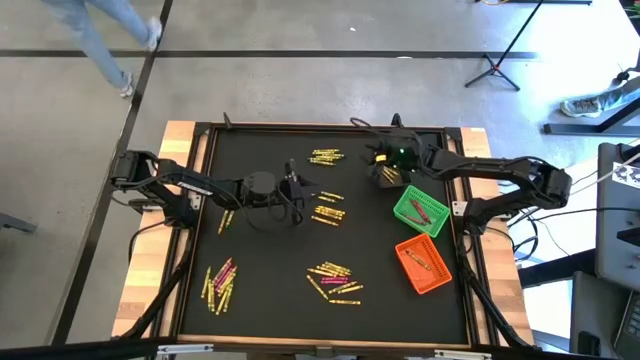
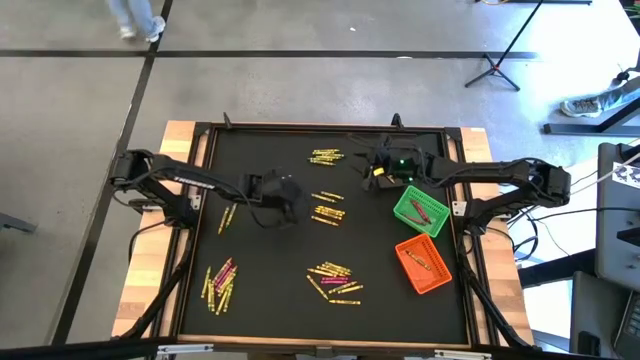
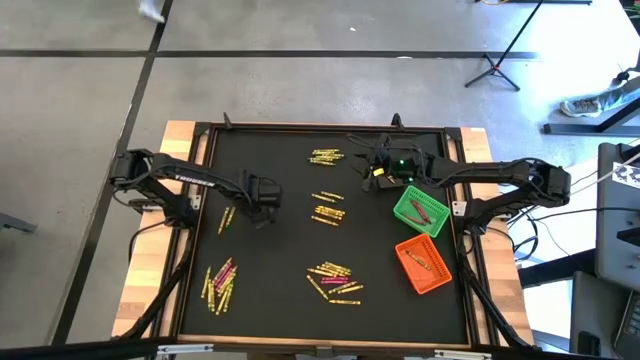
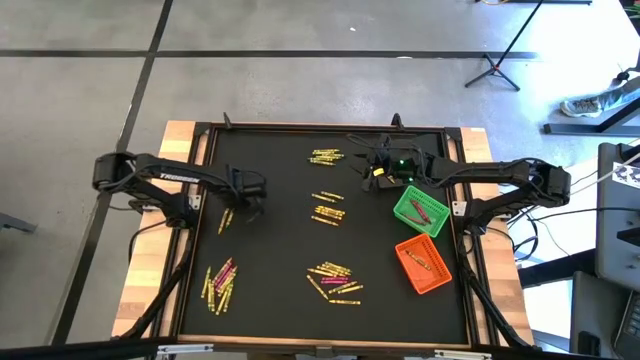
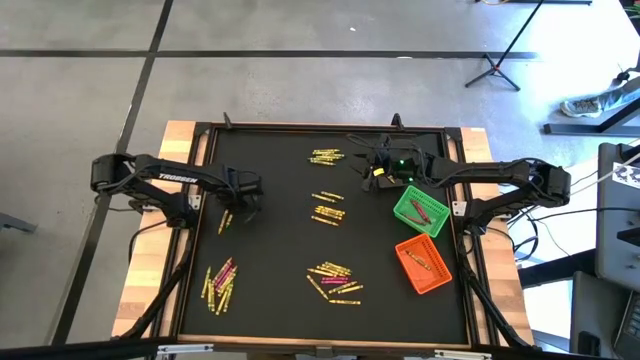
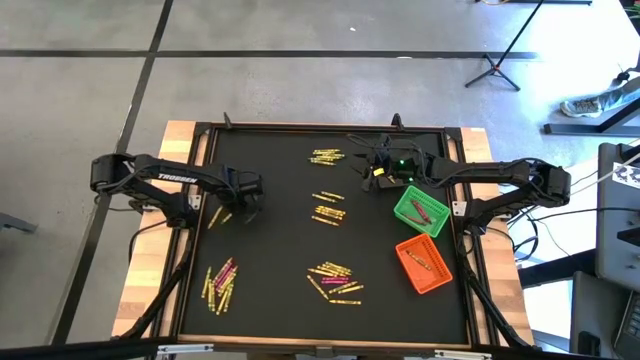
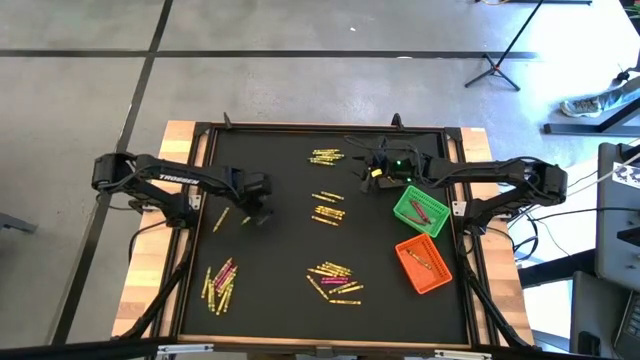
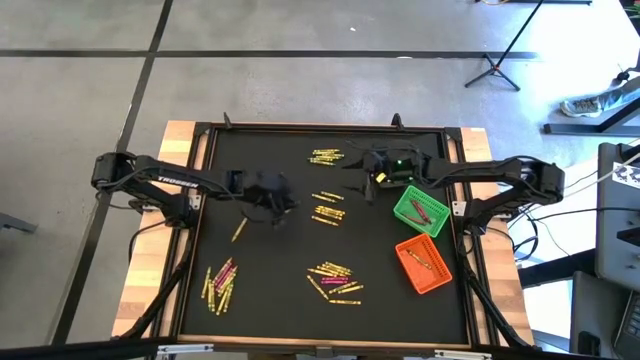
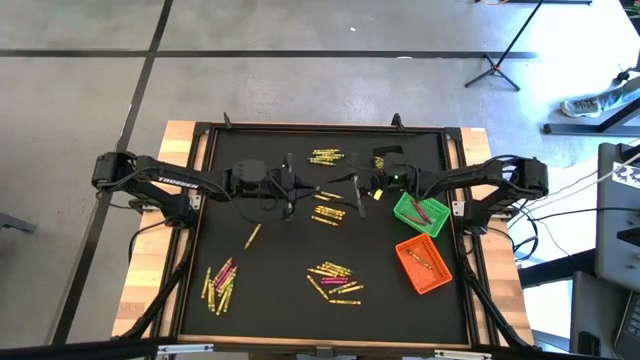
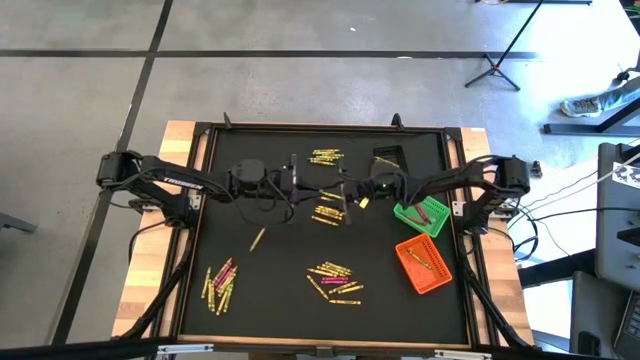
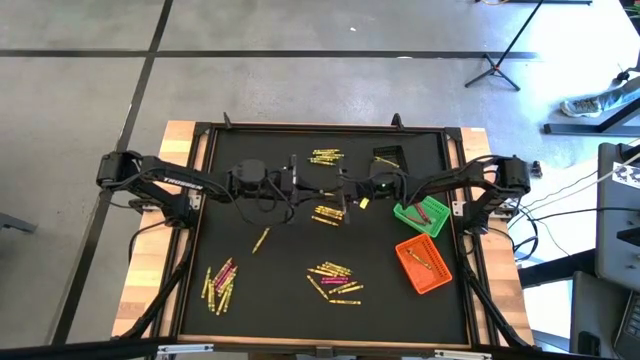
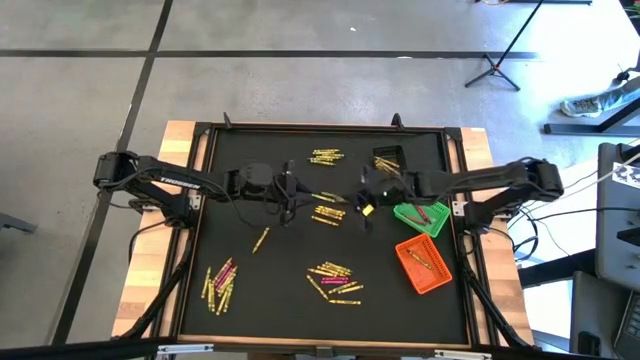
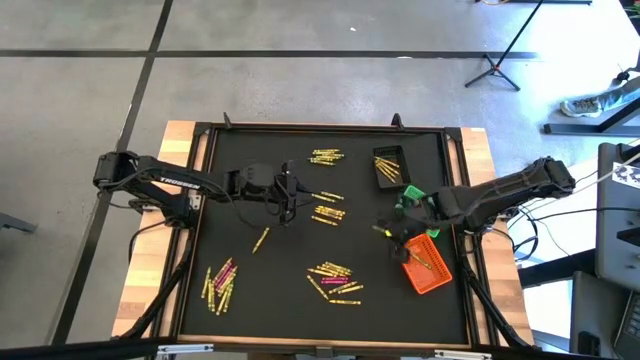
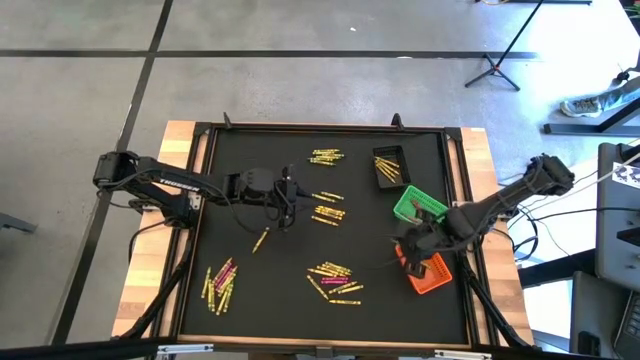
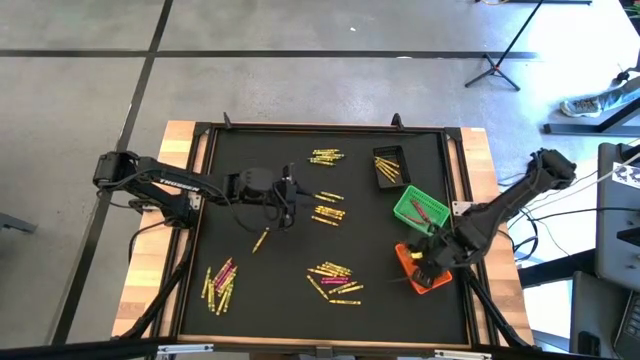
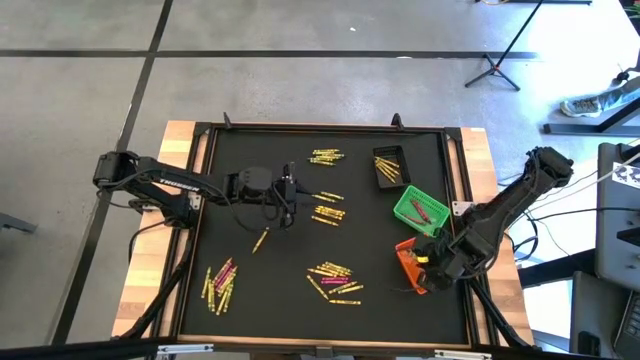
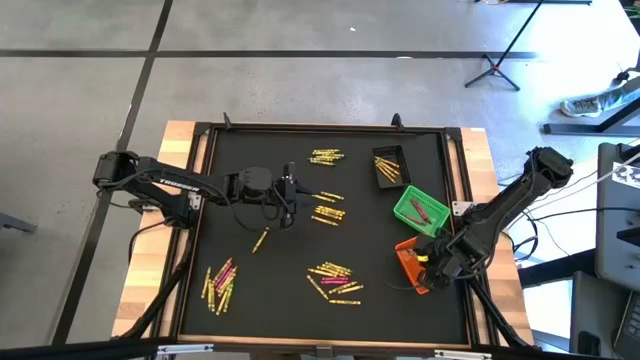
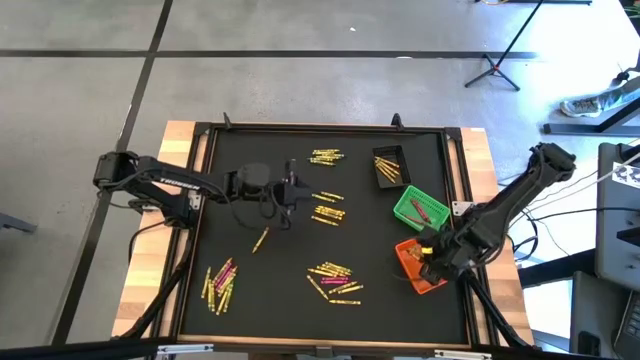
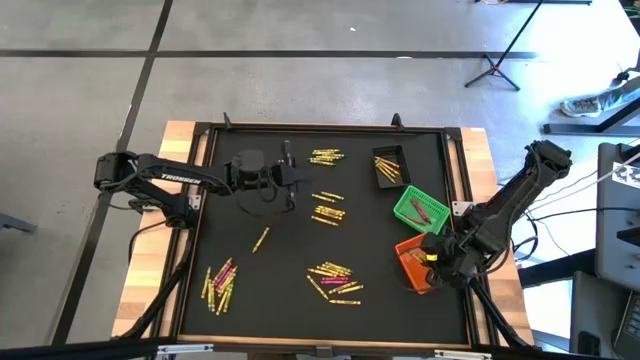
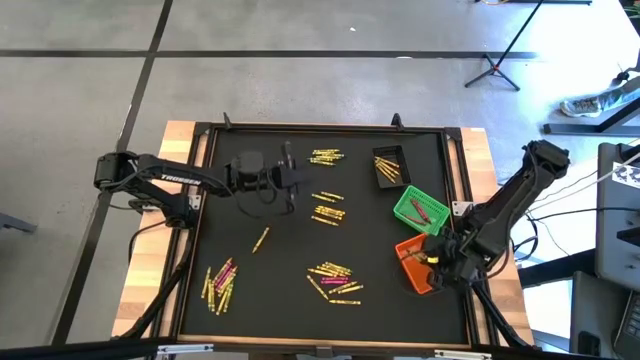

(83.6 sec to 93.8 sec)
Task: Sort crayons
Put the green crayon into the orange basket

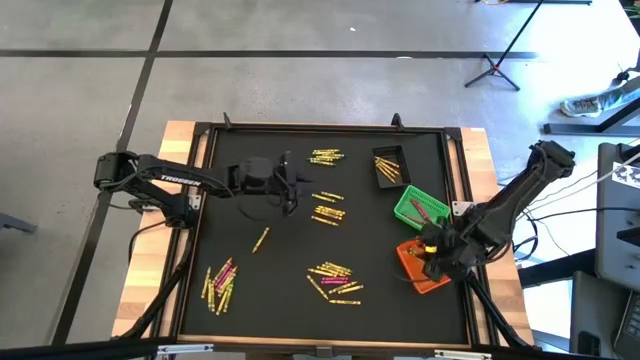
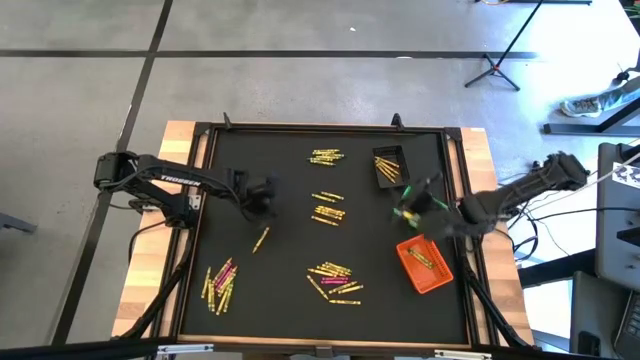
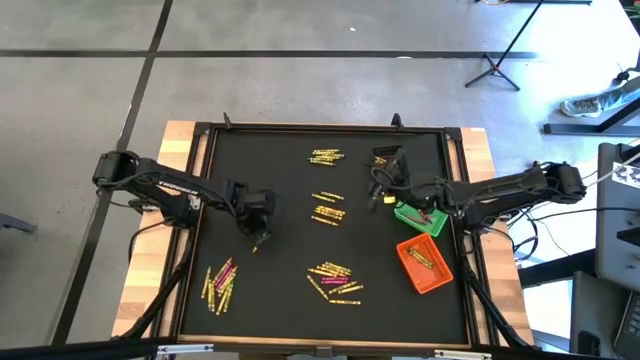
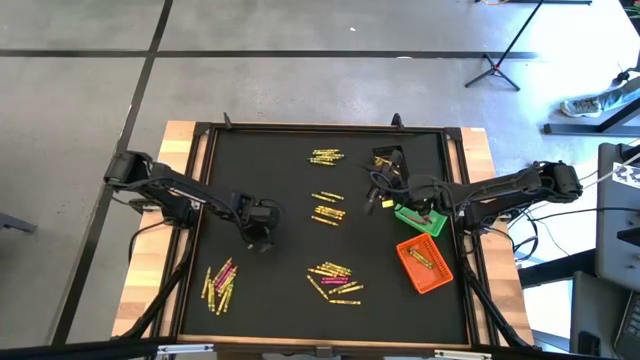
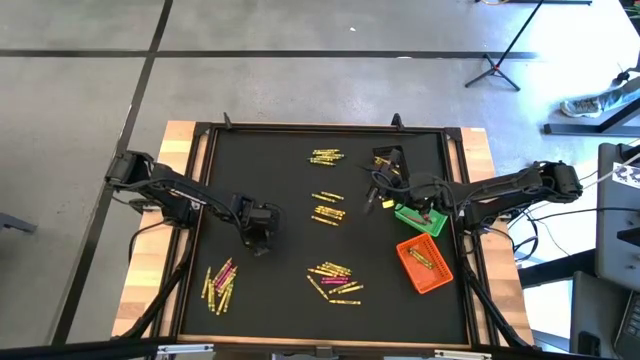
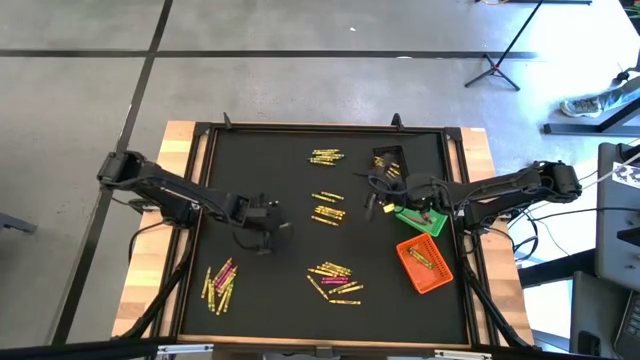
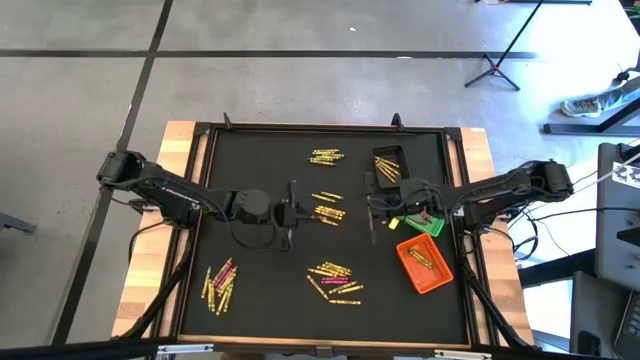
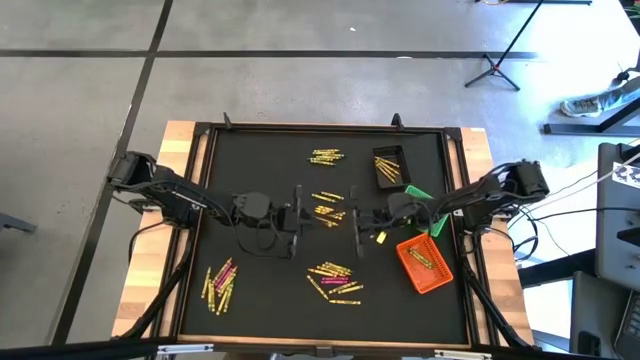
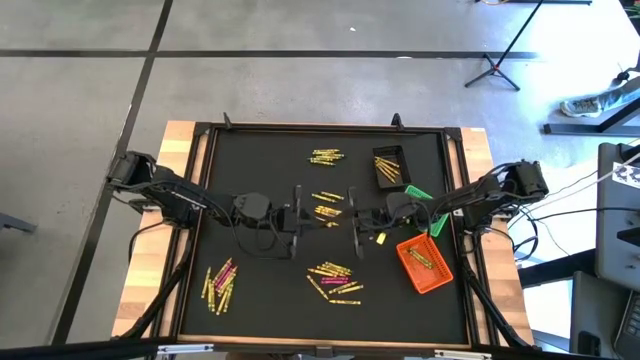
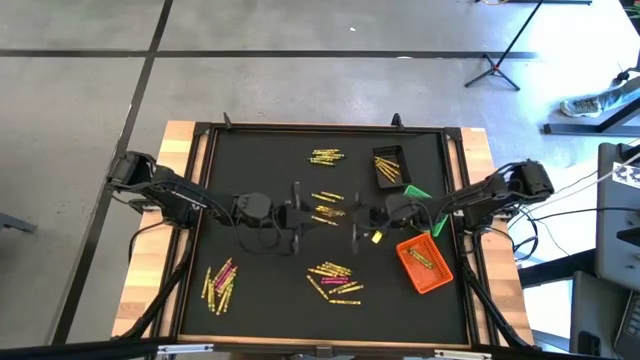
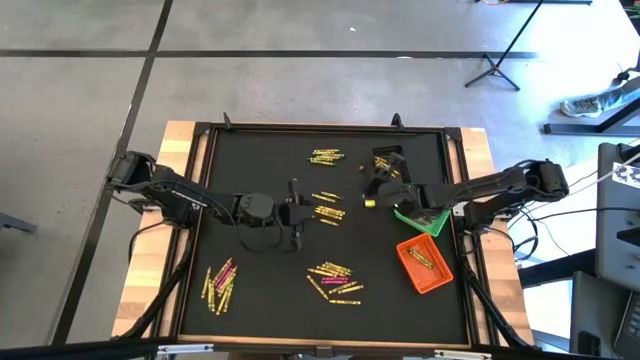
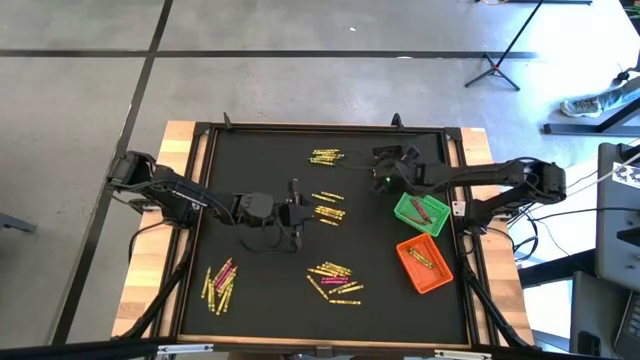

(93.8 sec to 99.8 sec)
Put the yellow crayon into the black basket

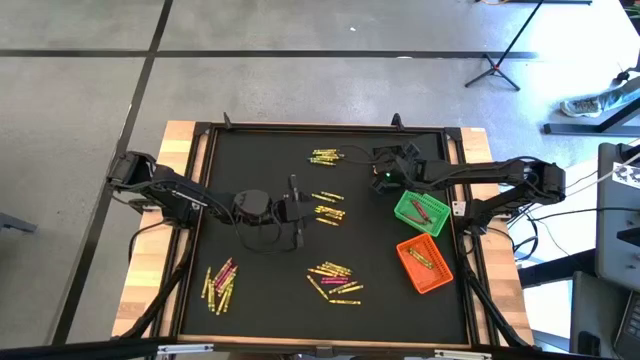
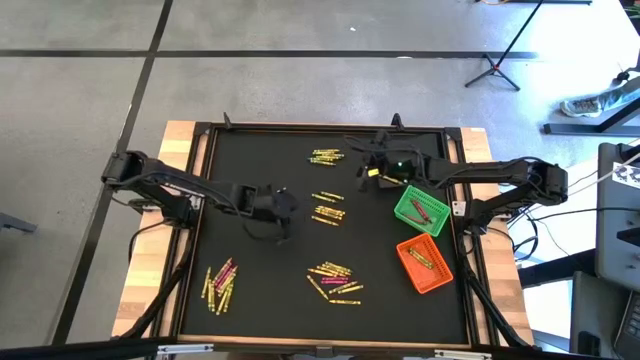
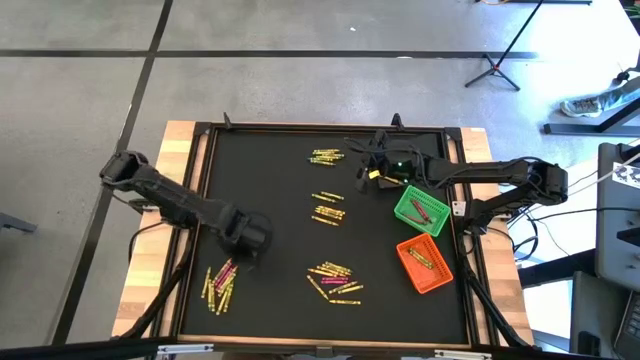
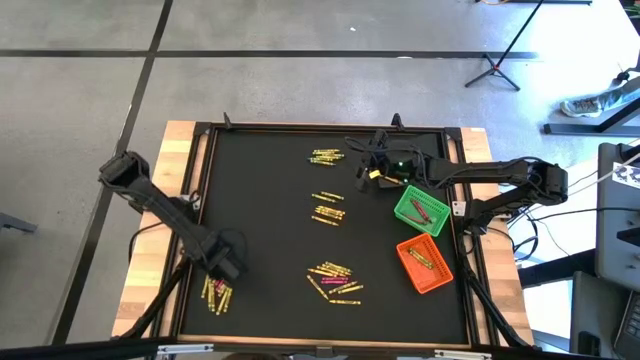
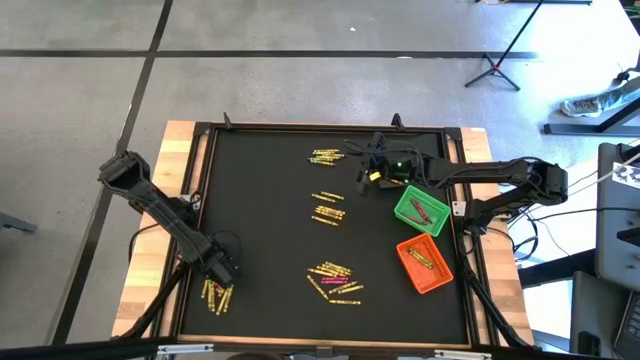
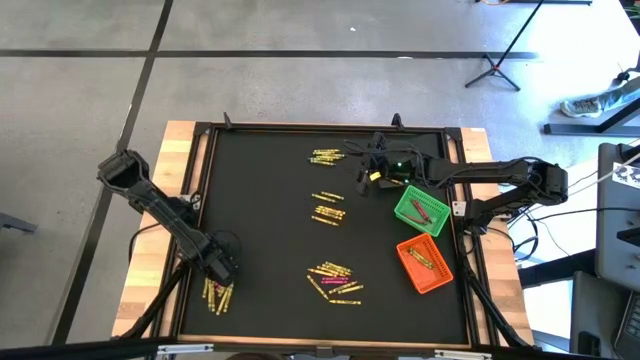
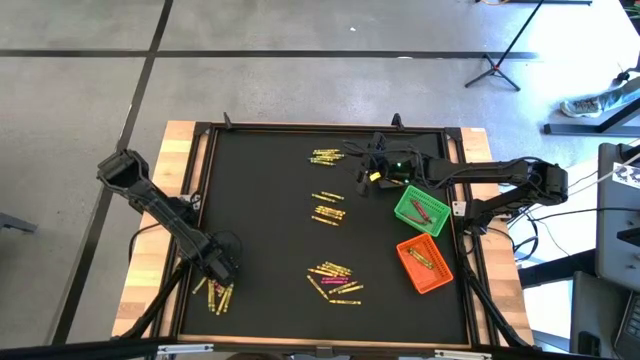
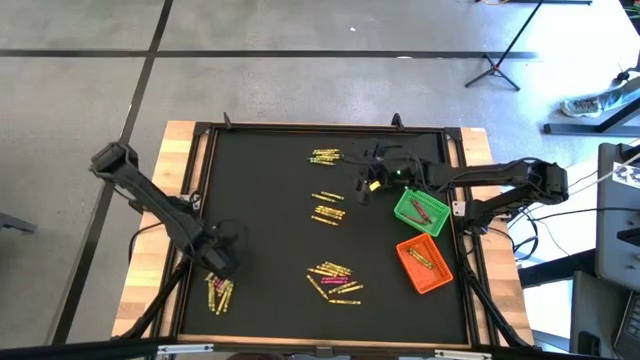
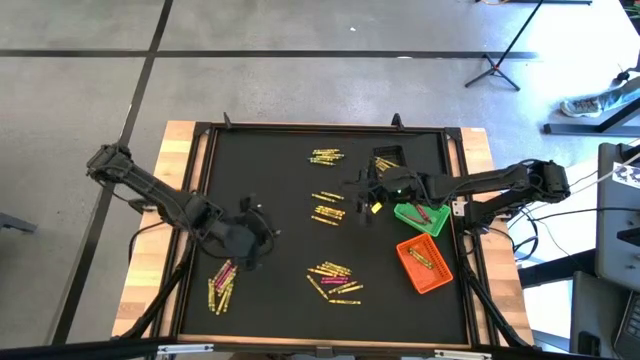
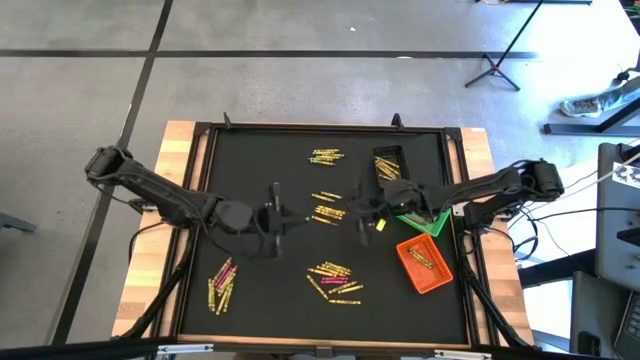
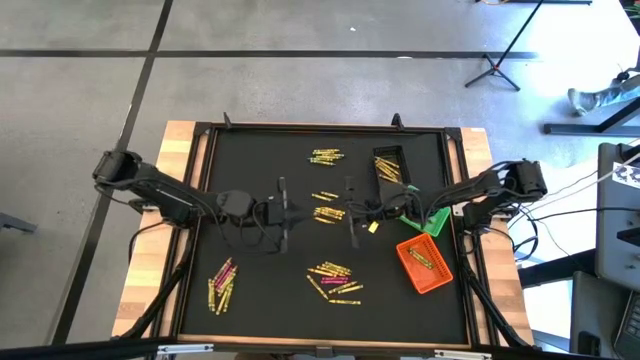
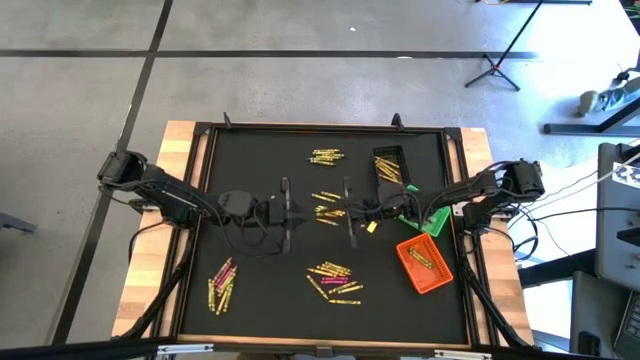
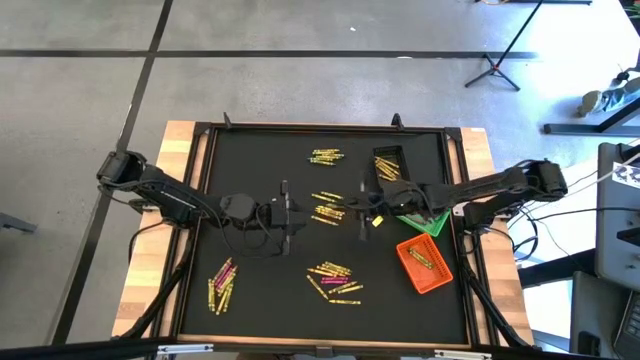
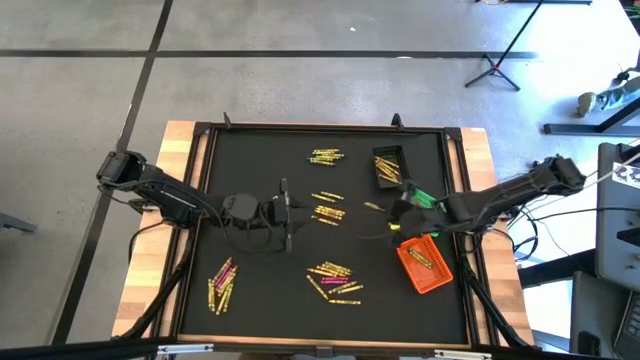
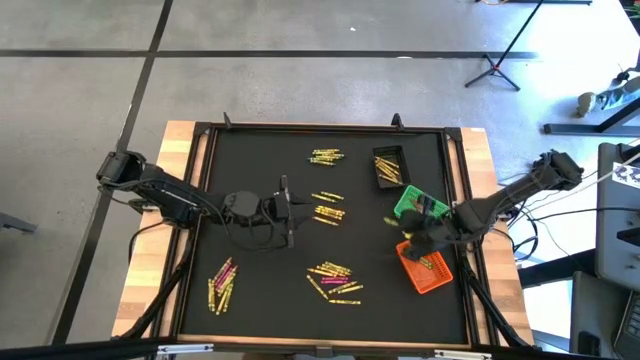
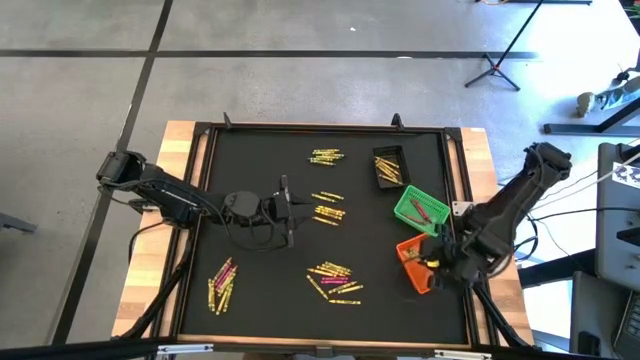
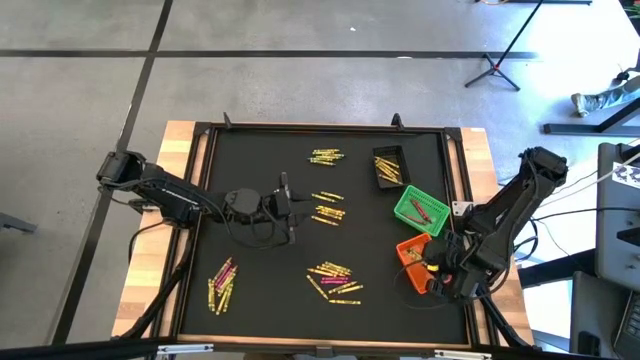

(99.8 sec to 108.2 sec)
Put the light green crayon into the orange basket
